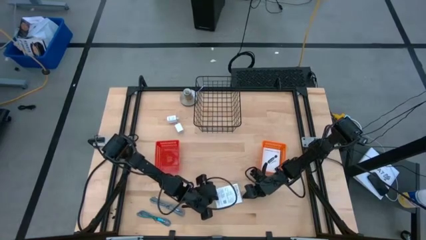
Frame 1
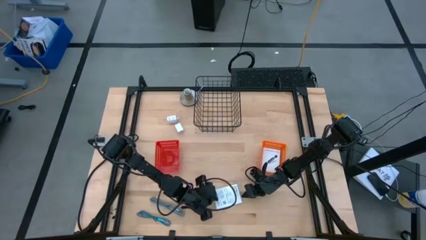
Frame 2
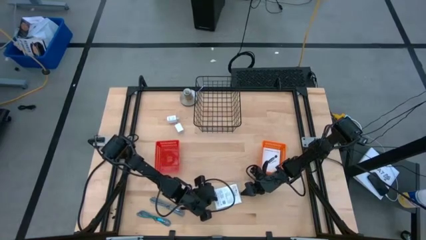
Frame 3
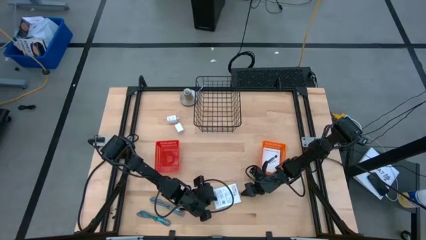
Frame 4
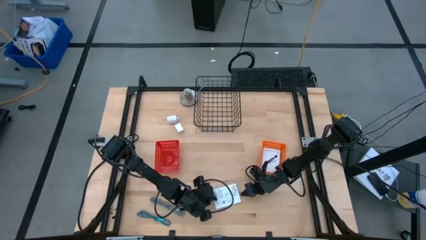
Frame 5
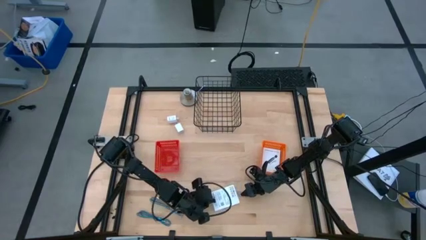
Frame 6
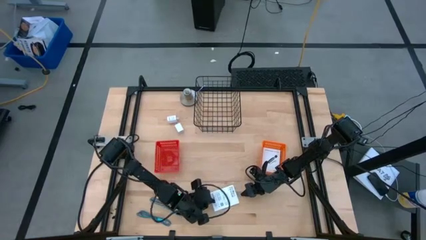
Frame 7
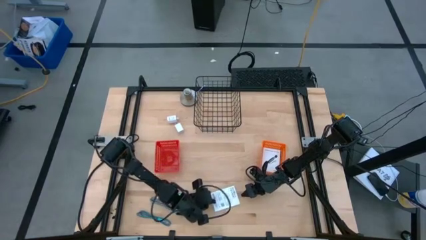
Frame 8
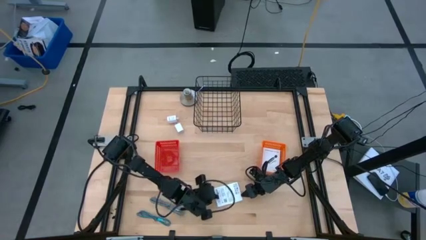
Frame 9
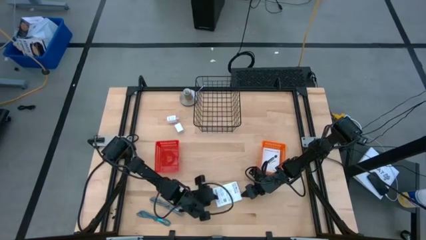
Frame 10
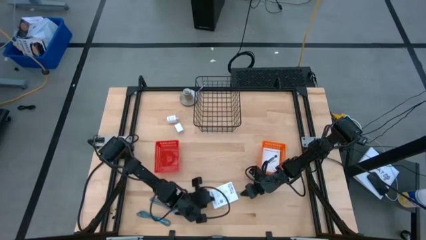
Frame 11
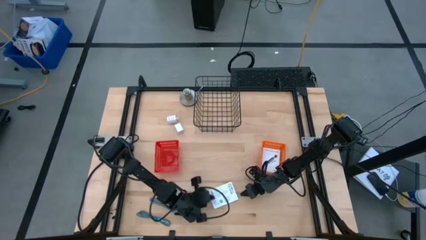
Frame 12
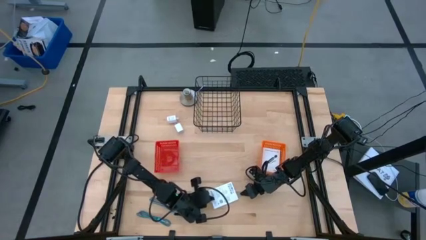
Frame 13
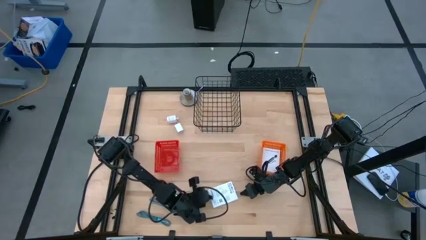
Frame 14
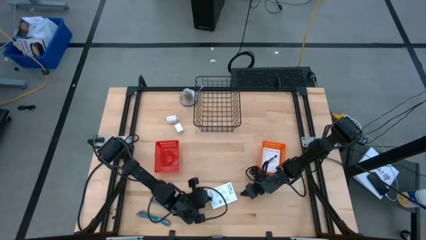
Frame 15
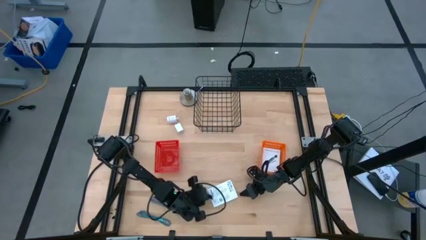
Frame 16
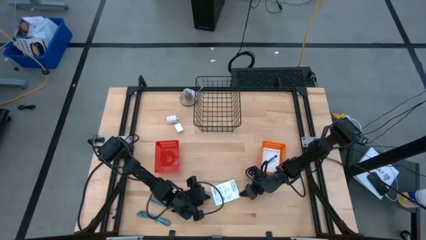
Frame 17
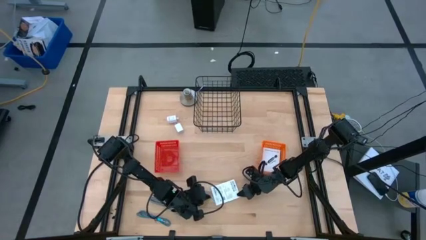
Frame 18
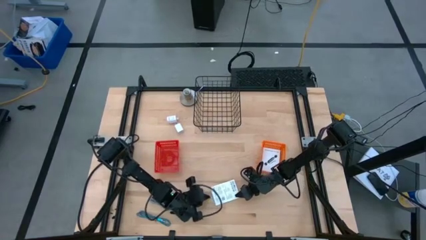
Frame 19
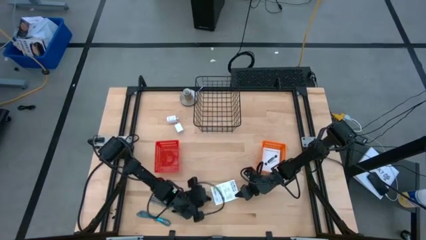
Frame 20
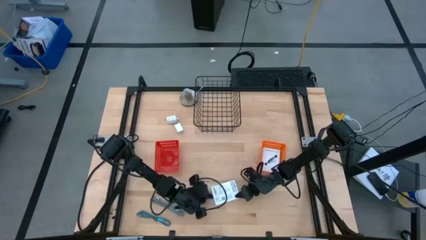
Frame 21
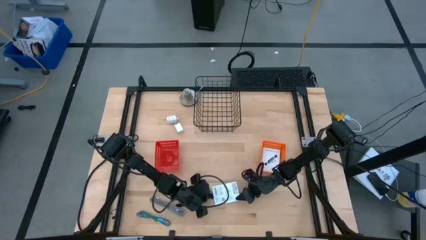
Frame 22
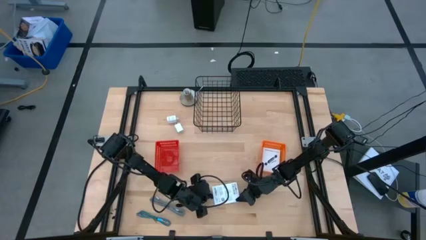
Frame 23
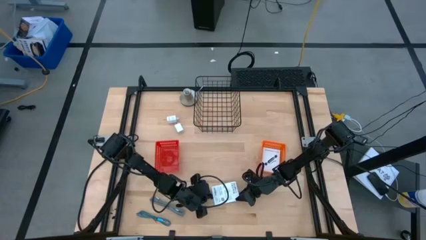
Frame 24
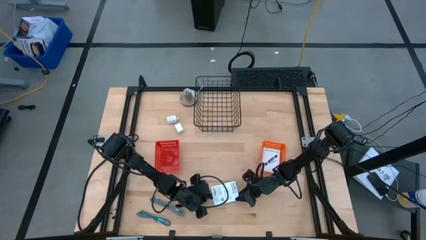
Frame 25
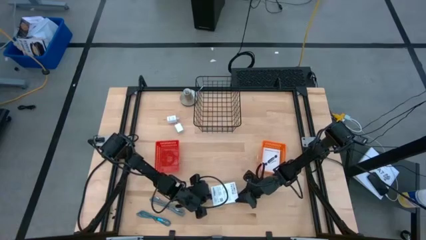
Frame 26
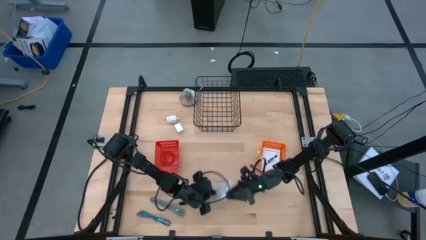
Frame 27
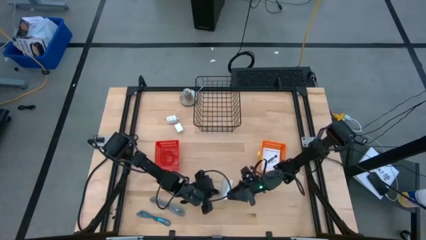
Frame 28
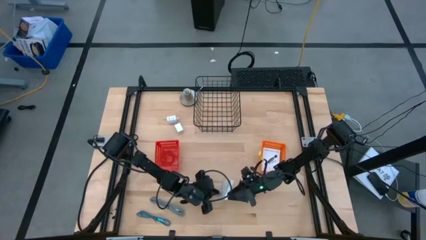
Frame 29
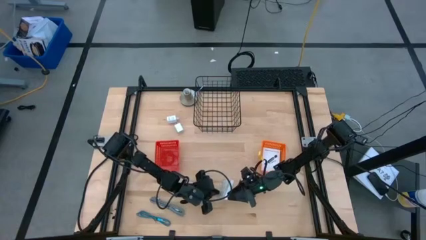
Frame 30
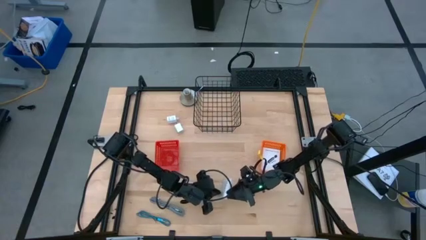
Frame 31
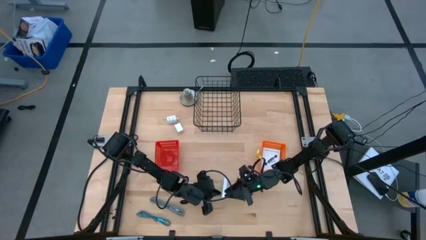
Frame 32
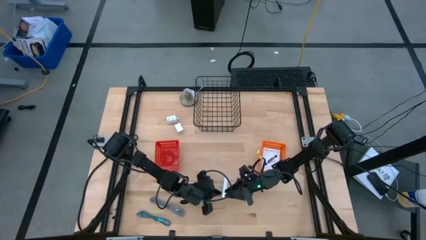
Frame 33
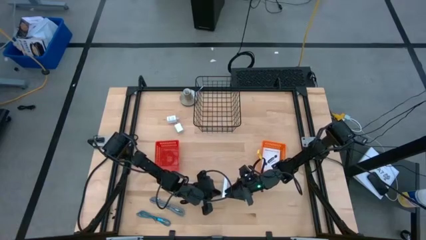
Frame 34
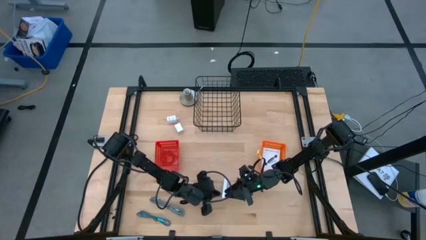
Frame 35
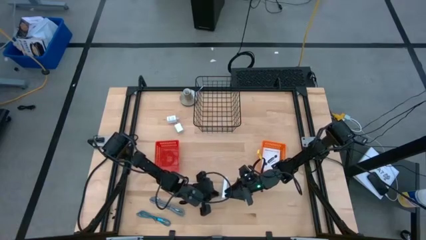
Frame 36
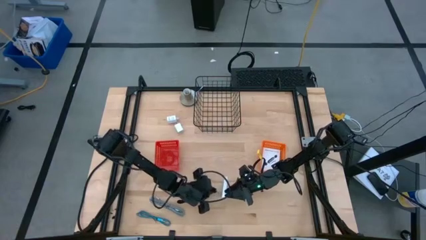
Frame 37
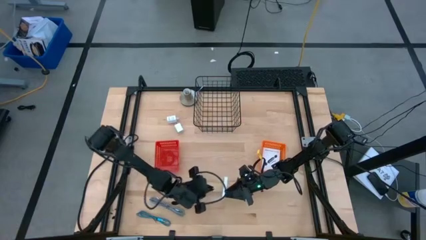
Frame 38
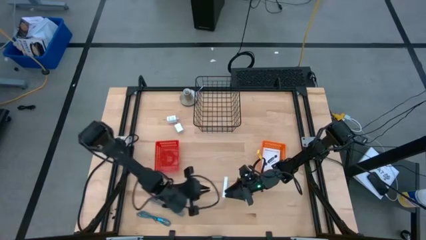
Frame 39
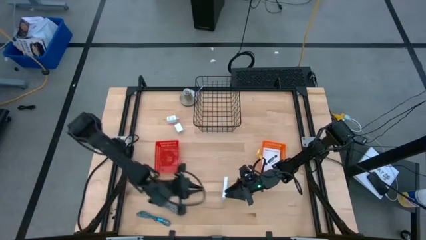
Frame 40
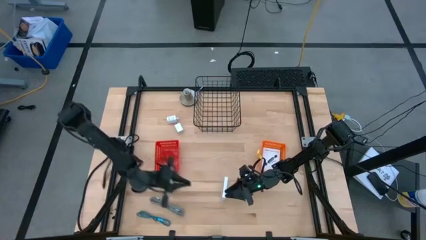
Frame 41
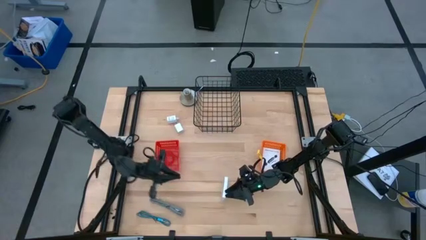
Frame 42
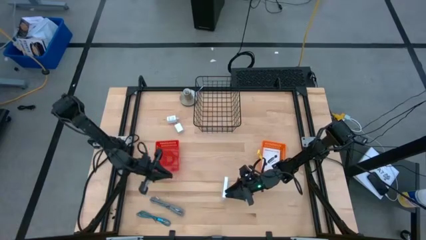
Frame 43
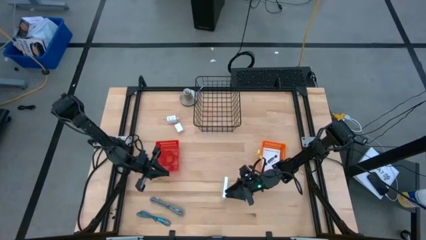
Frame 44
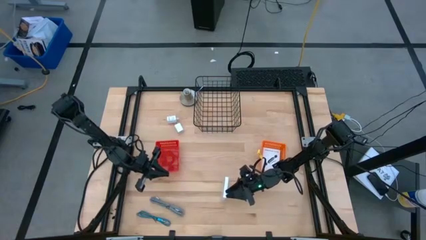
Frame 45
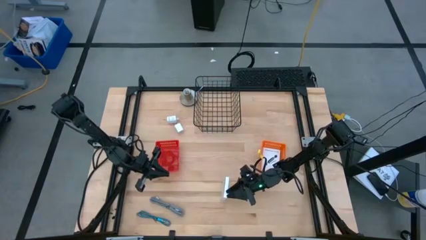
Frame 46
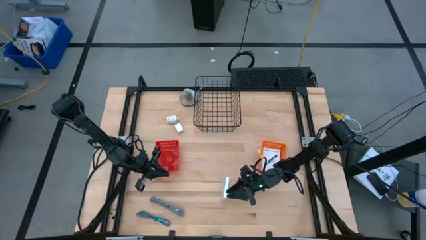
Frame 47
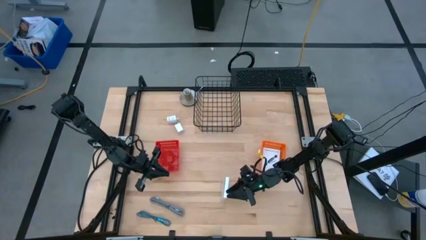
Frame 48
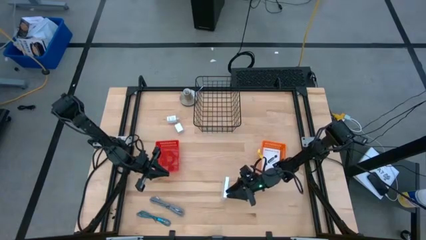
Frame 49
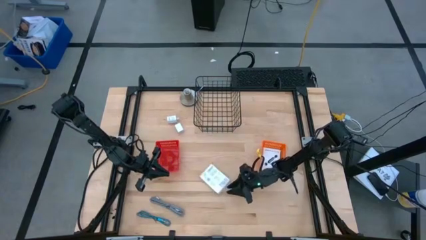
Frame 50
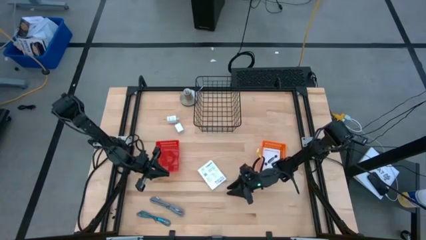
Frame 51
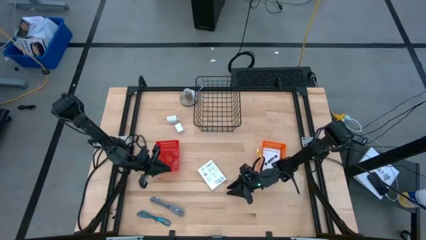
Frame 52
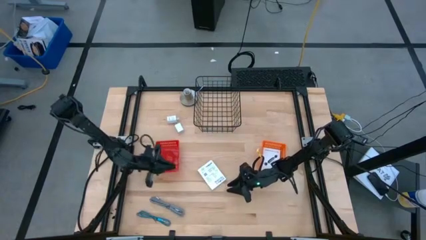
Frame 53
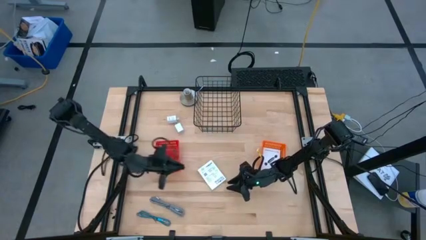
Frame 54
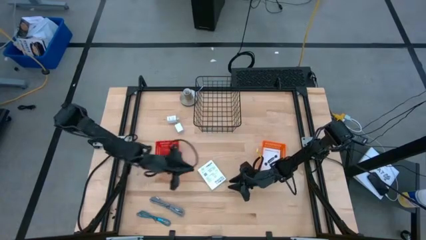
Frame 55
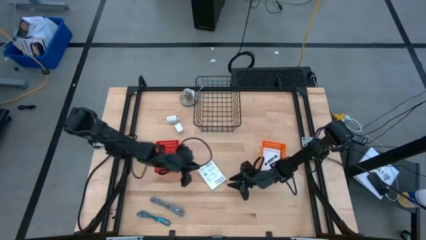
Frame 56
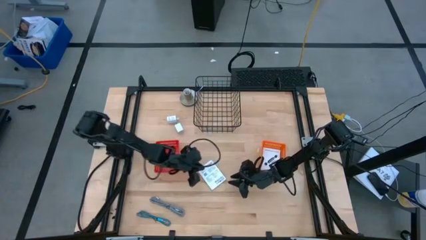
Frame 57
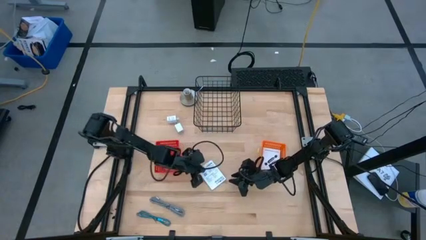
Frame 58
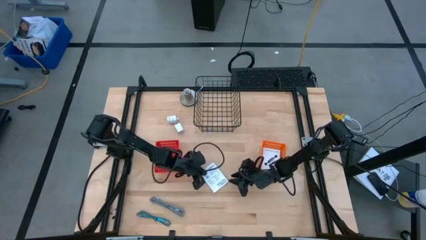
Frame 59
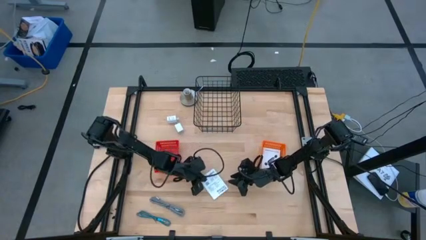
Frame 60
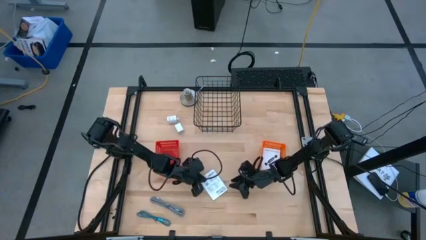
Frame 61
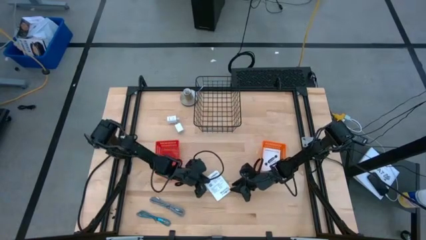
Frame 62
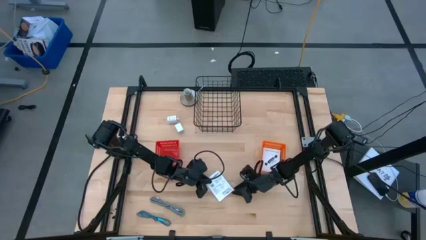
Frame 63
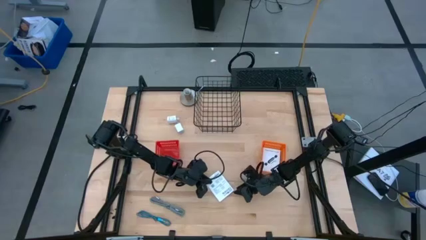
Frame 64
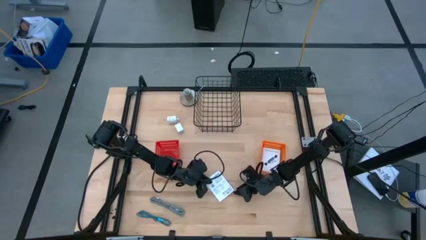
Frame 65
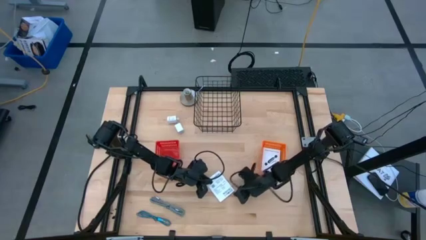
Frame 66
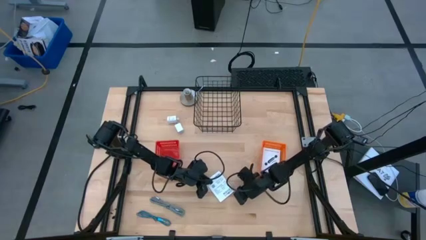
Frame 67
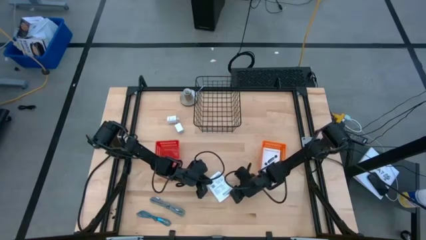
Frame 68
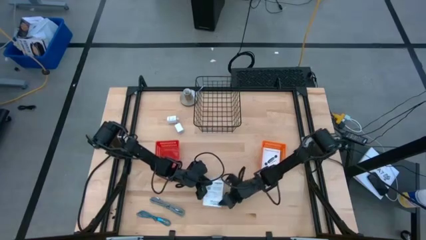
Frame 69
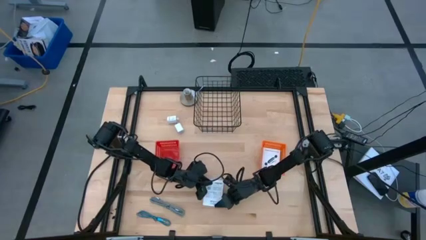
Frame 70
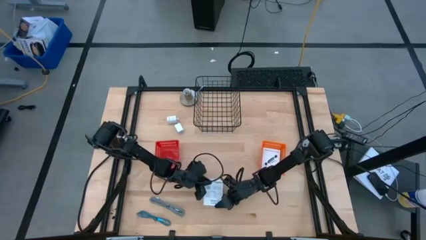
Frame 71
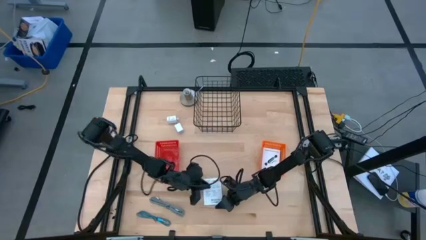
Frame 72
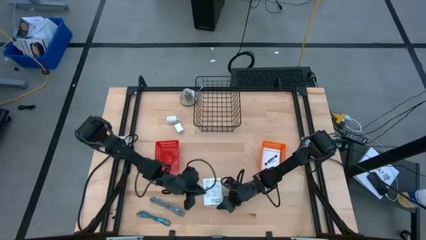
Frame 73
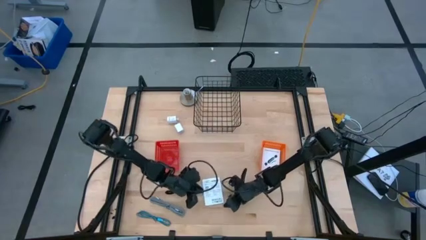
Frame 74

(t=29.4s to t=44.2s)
Task: Pick and place items into bin
Put the card reader box into the orange bin

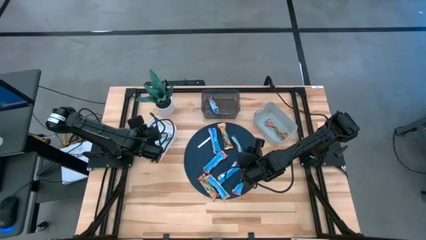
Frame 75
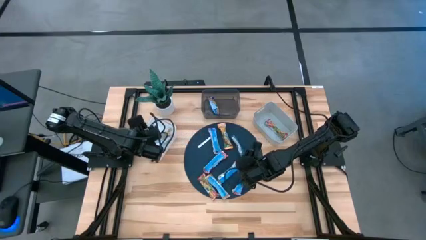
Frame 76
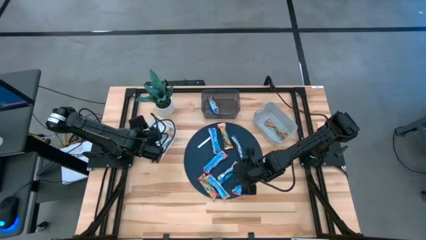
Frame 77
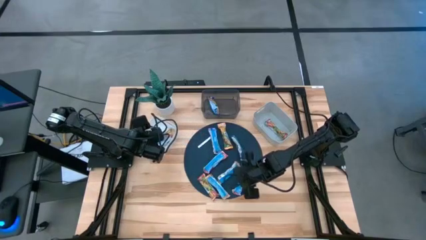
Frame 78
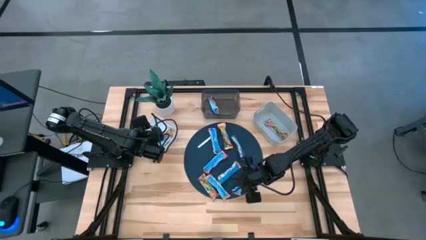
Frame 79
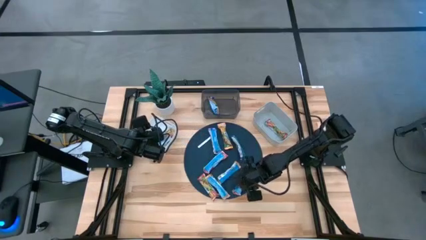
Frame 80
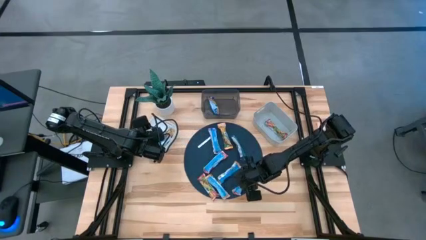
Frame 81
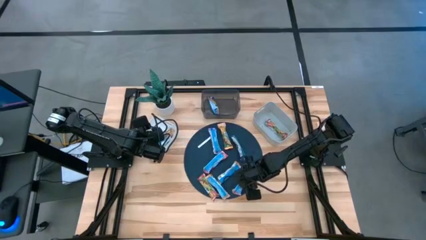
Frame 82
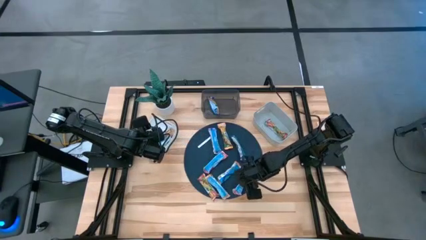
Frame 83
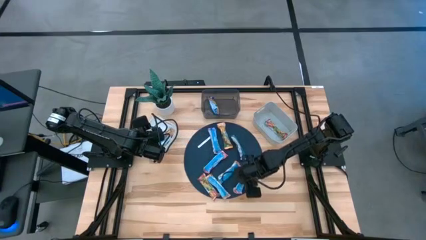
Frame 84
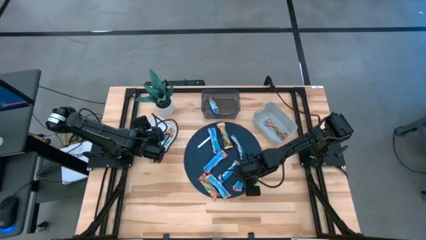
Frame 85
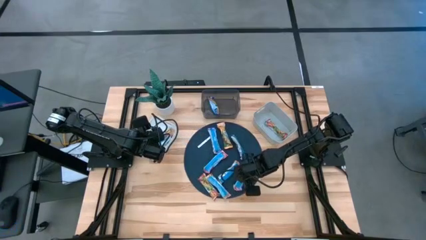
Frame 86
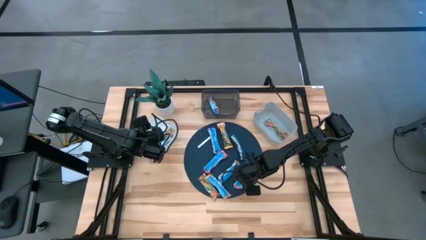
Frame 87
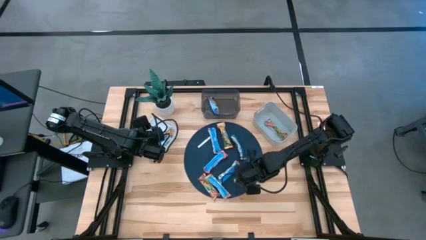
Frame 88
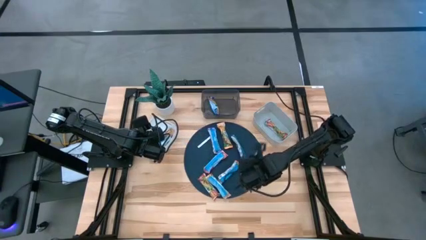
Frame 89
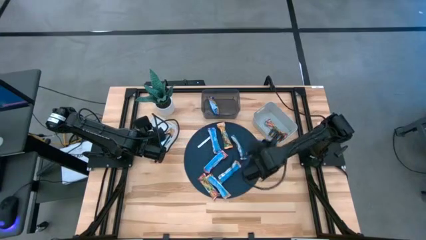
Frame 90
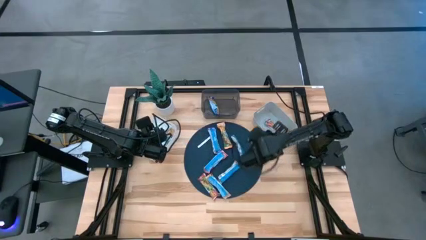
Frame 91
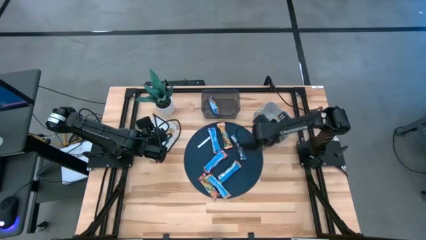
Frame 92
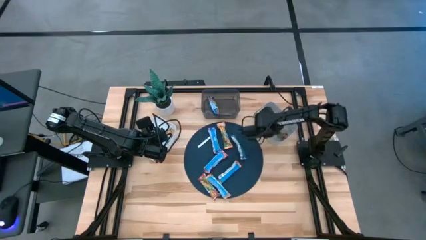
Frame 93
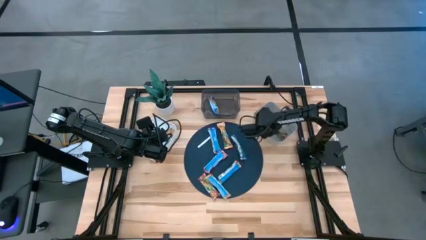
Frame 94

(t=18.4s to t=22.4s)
Task: Pick and place Granola Bars by type
Put the red granola bar into the gray bin
